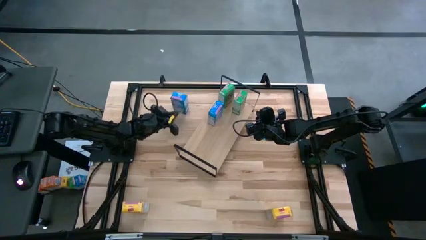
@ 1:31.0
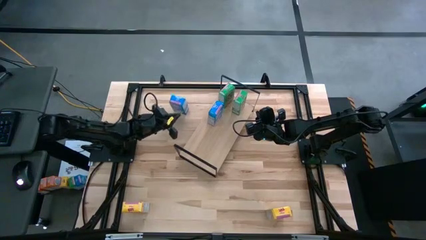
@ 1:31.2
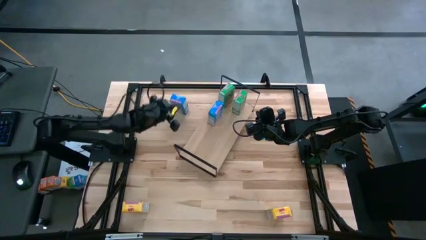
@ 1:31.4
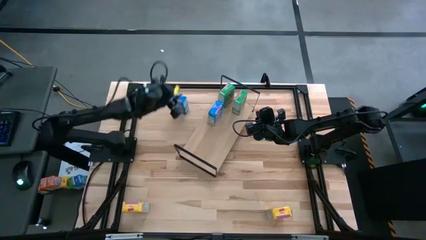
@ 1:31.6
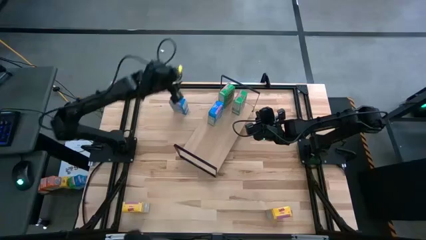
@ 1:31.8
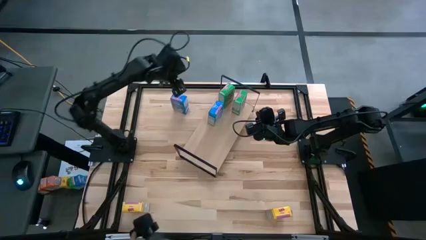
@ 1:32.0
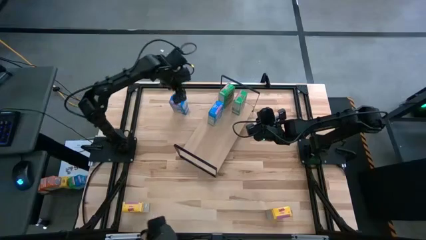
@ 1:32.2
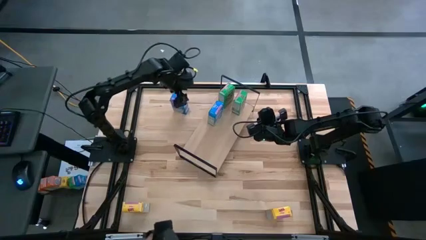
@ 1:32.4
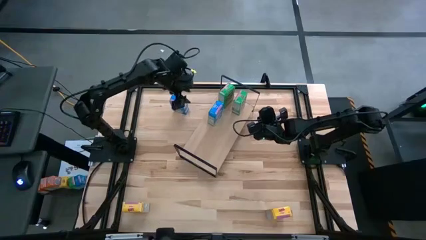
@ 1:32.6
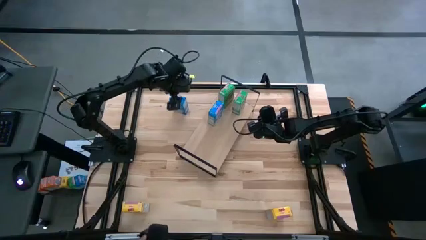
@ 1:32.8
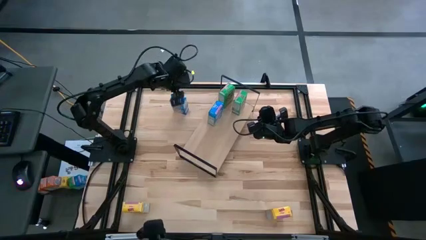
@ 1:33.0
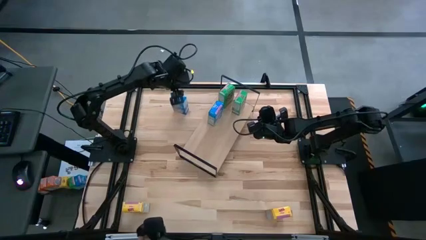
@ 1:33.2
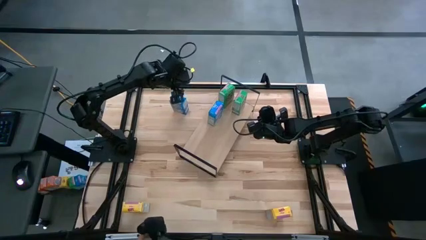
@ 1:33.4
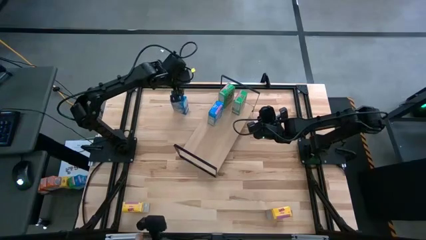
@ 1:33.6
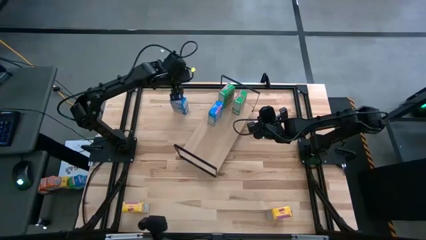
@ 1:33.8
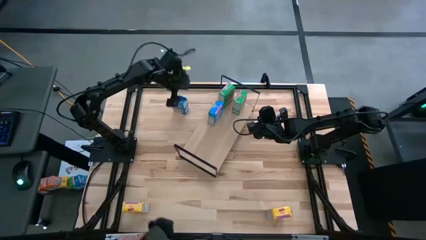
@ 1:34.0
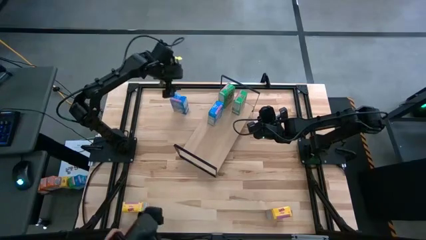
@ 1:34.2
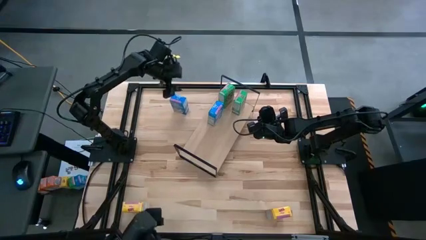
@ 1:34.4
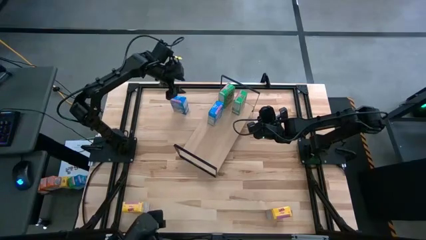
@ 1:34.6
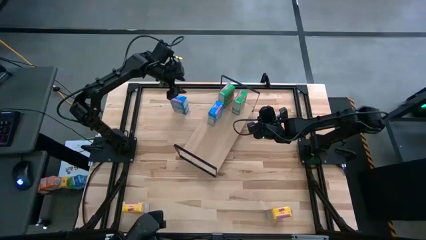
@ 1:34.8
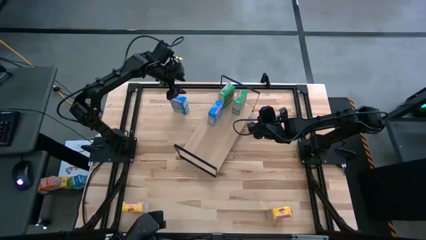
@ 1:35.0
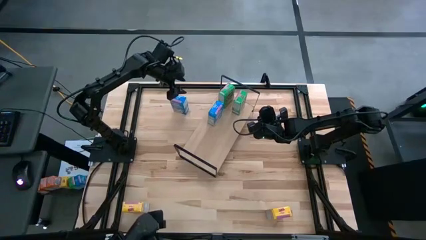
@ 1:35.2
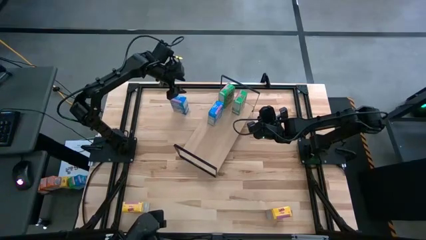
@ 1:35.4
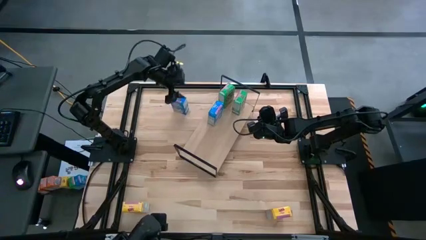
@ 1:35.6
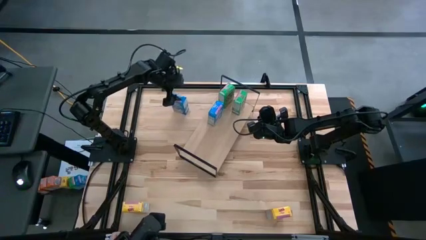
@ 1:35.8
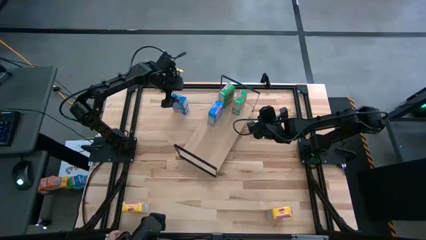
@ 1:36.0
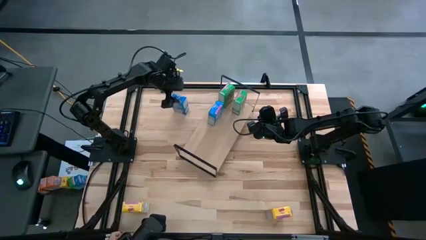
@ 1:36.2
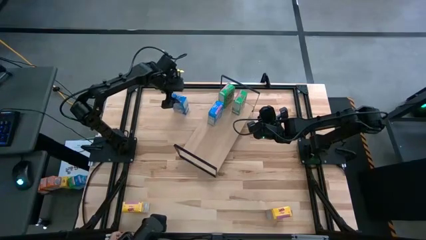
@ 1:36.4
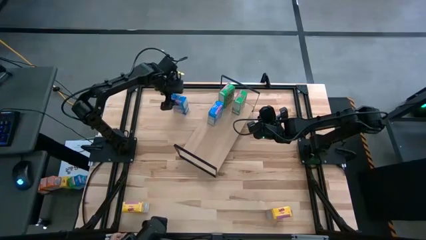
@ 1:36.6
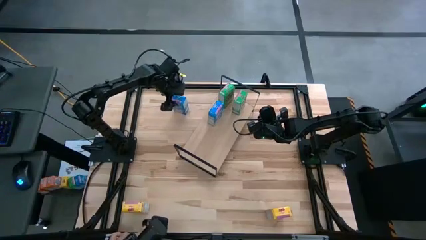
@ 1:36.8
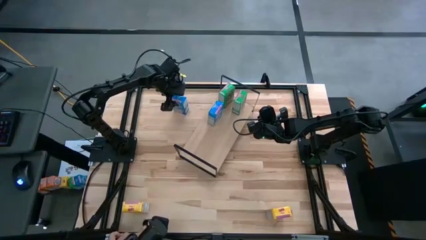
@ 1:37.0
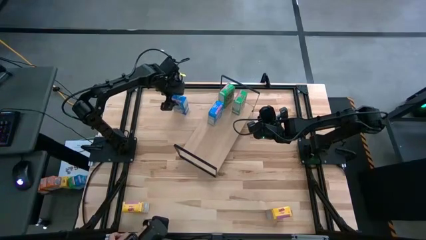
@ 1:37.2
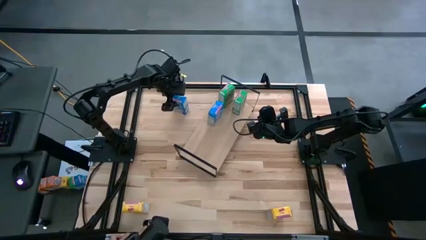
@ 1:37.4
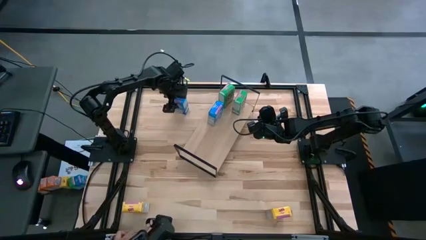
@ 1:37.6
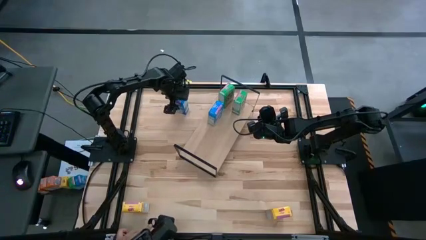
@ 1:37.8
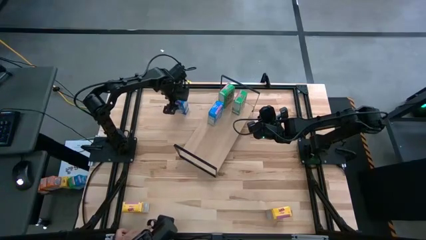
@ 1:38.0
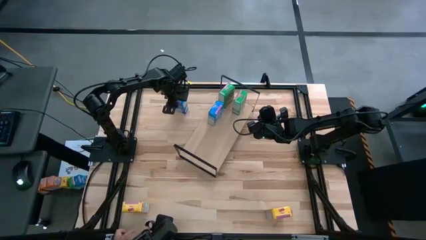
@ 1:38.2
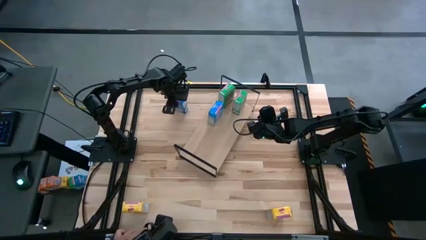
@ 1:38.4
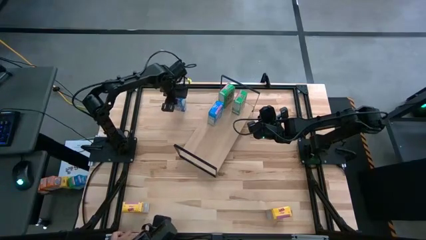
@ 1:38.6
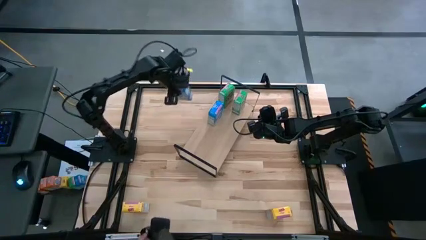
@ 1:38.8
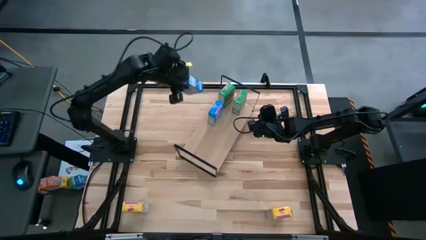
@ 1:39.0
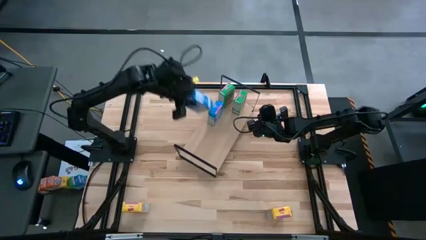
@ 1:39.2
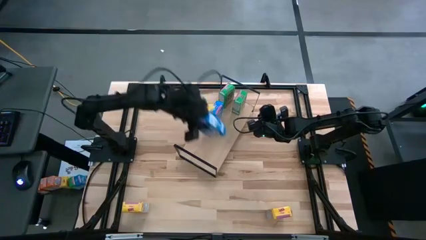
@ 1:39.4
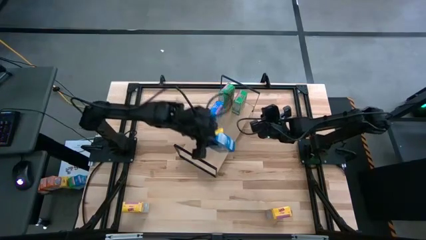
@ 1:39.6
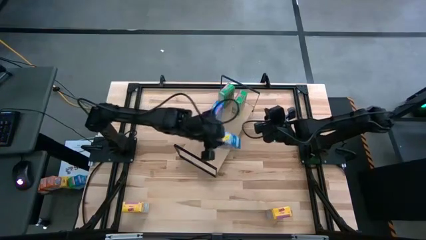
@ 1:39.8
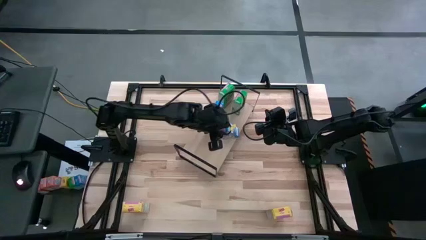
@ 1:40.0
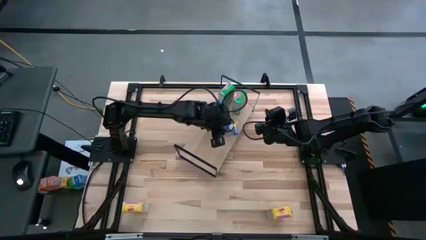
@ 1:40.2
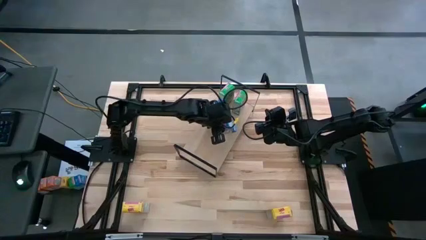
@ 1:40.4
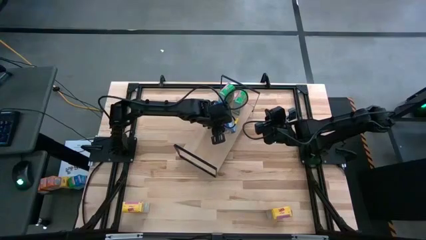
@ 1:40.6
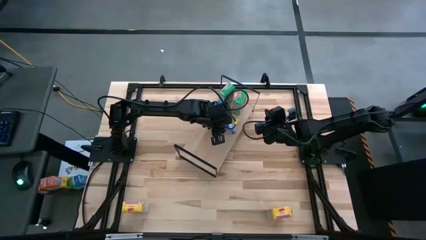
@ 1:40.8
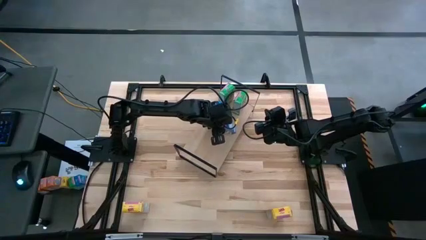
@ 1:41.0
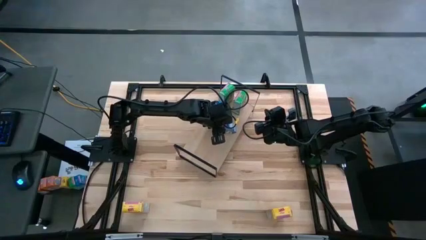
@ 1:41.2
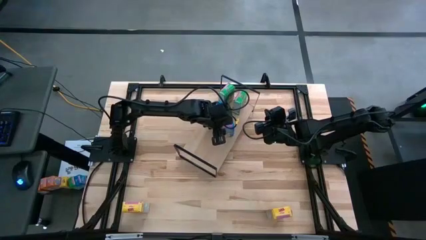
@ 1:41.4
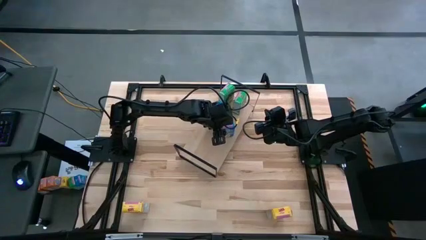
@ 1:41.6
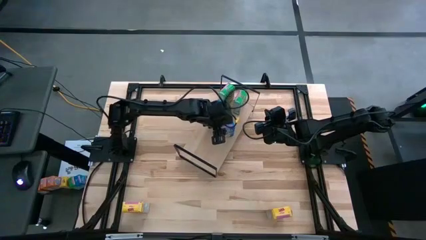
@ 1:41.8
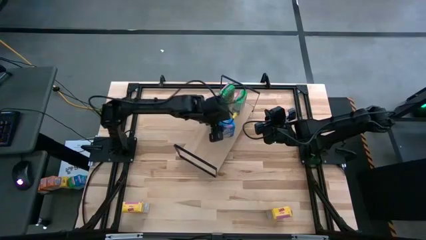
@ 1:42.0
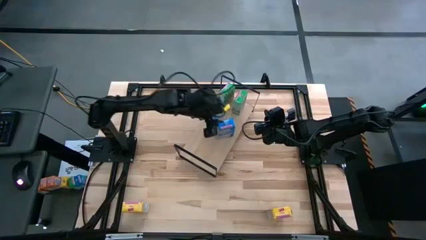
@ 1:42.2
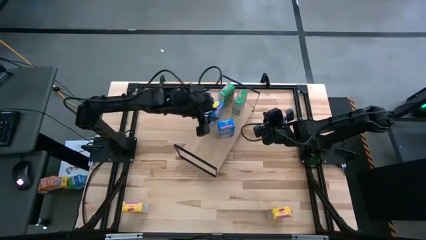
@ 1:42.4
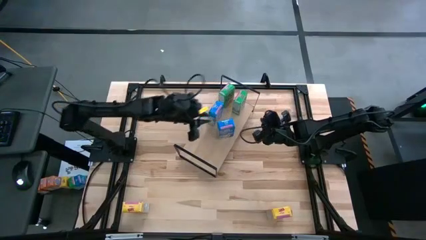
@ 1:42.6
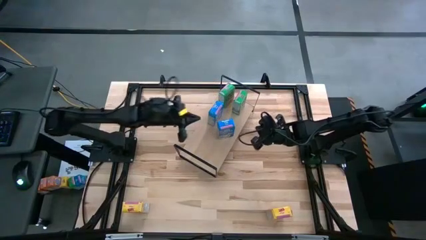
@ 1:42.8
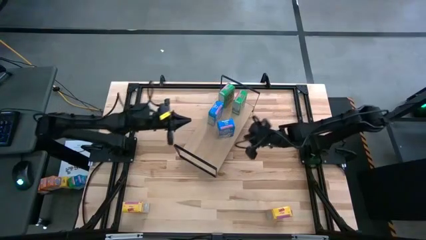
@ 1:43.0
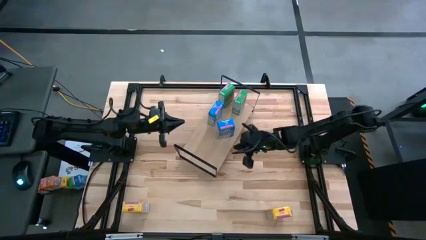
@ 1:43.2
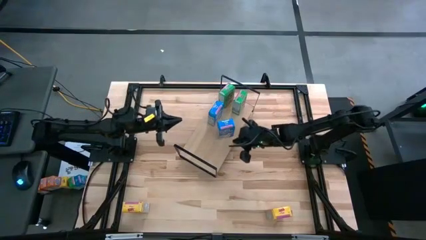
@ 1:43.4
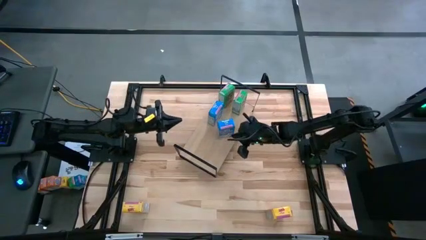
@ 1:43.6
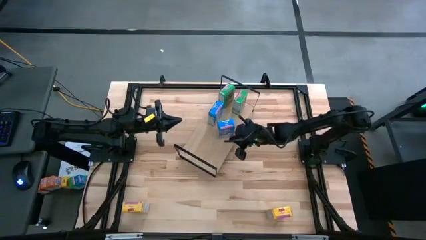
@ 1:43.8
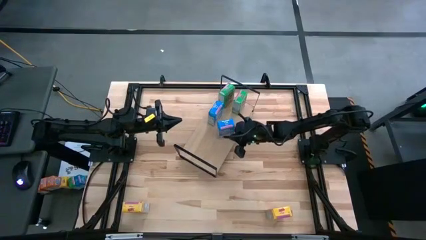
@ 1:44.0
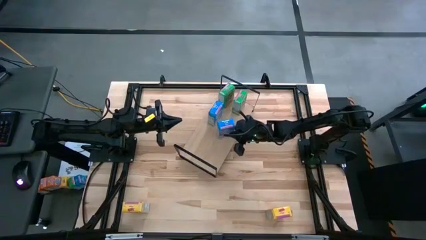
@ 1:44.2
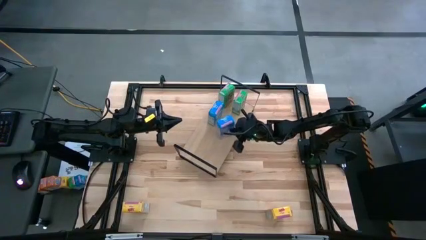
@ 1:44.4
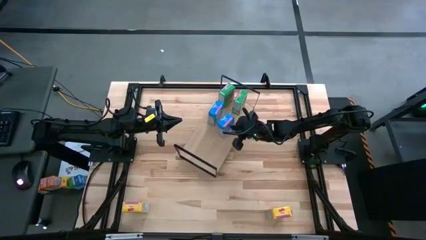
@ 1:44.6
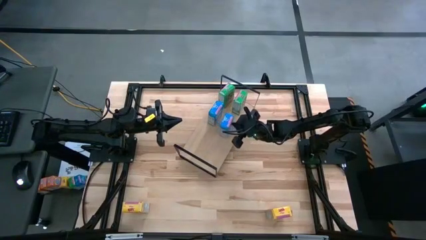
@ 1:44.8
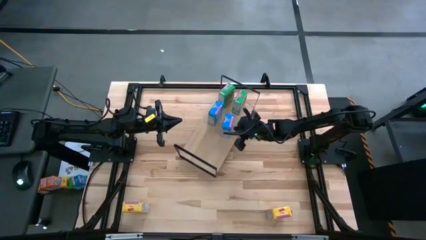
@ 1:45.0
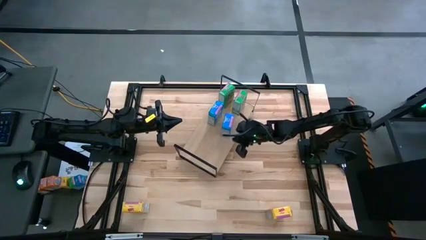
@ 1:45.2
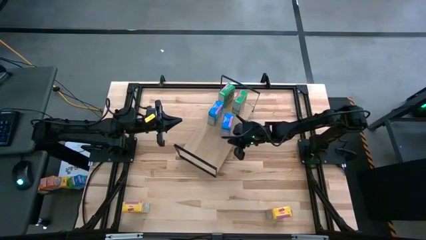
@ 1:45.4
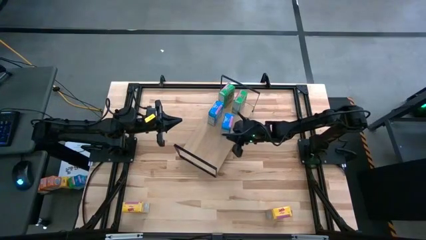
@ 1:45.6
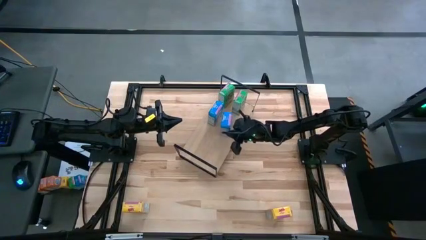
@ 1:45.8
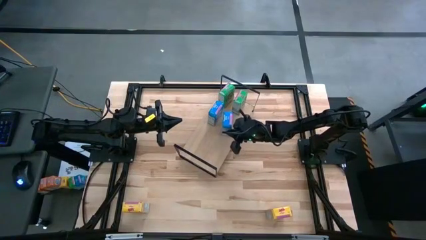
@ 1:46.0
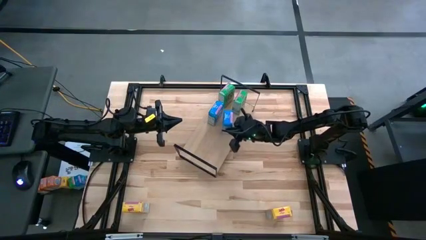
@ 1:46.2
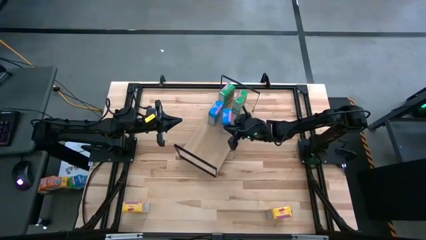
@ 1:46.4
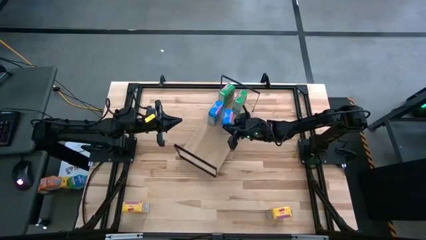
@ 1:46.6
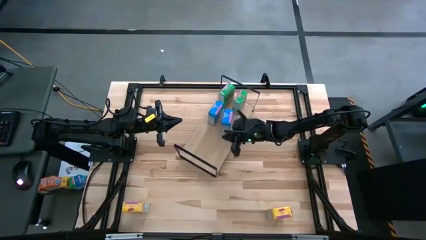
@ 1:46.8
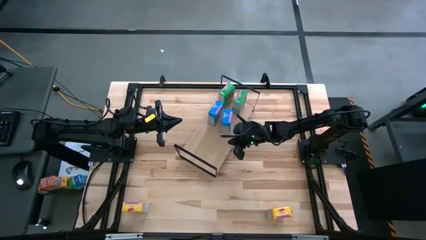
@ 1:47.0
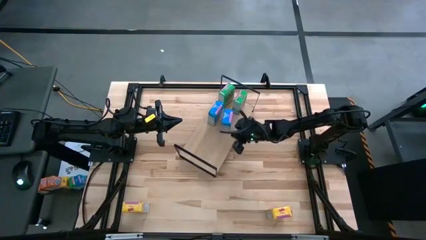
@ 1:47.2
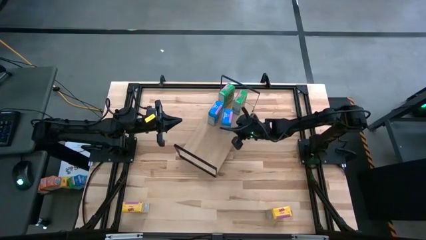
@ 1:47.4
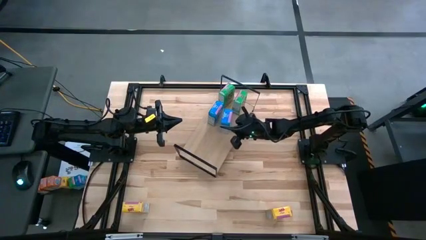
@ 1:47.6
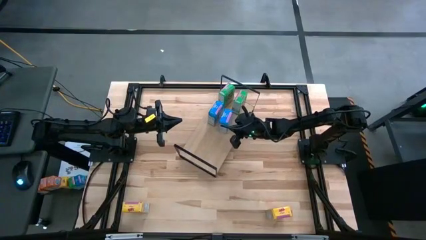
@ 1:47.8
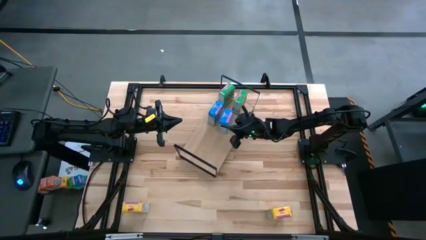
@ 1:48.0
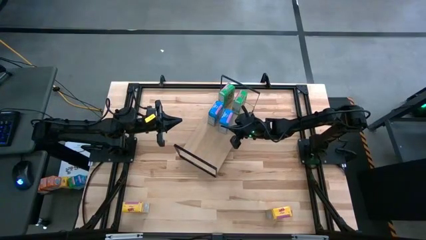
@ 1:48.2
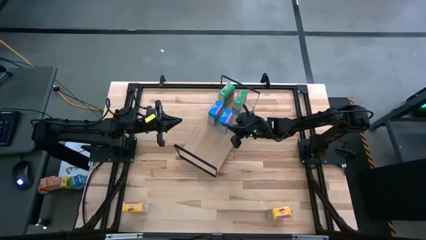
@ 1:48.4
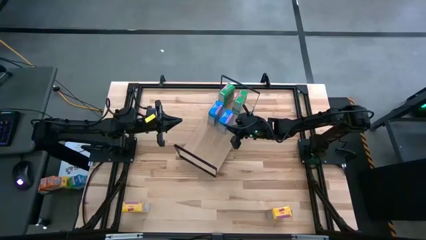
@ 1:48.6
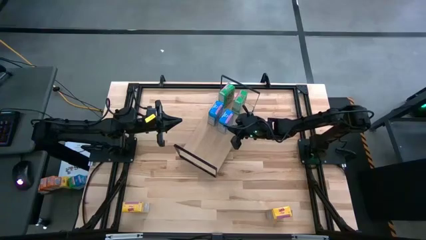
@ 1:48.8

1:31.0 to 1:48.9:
Task: Stack cereal on shelf
Put the blue cereal box aligned with the other blue cereal box on the shelf
